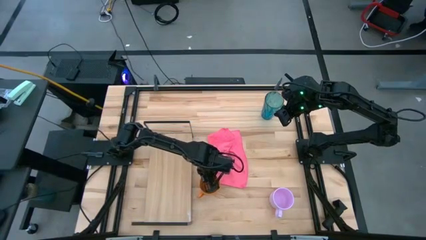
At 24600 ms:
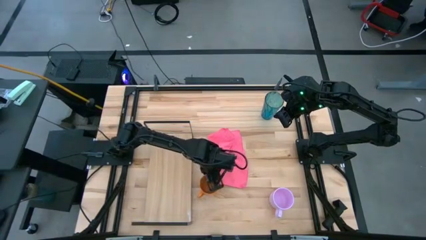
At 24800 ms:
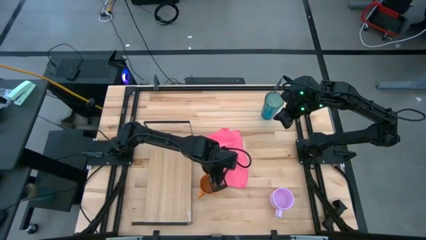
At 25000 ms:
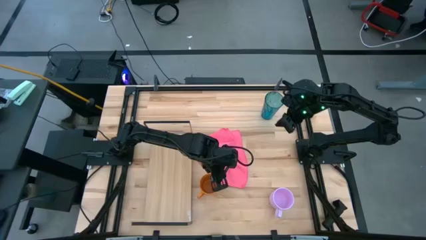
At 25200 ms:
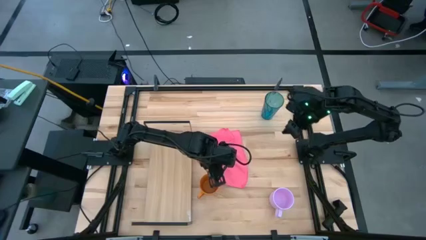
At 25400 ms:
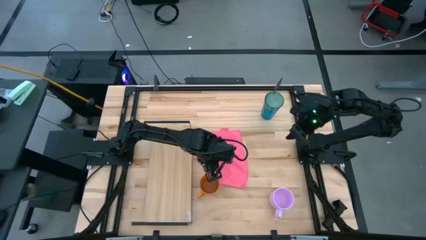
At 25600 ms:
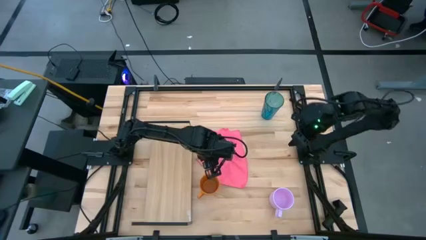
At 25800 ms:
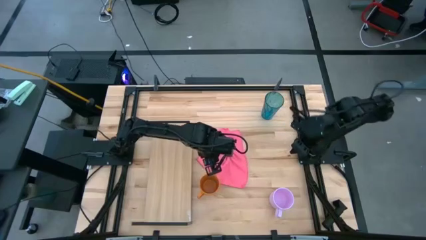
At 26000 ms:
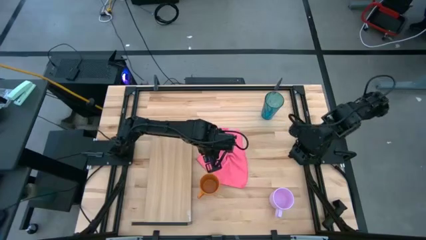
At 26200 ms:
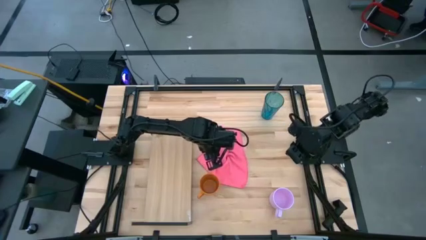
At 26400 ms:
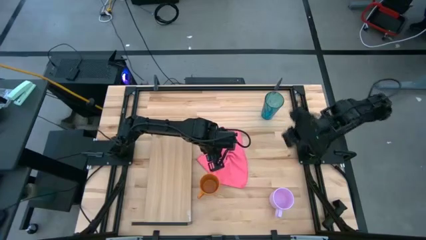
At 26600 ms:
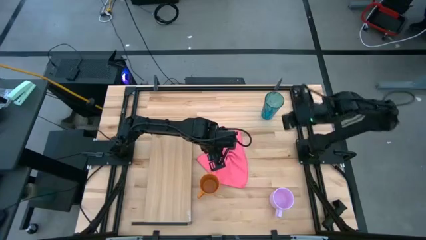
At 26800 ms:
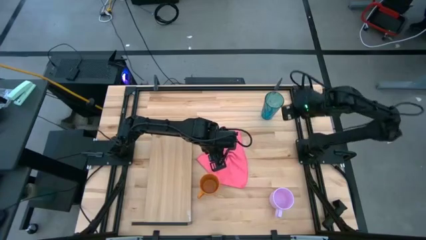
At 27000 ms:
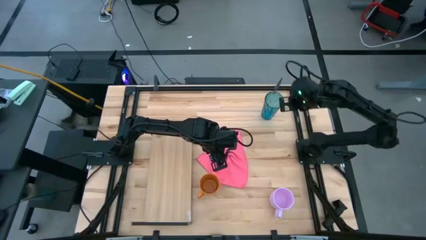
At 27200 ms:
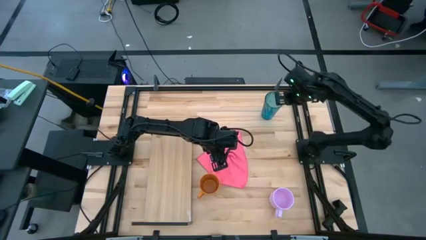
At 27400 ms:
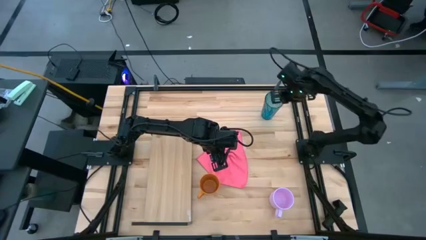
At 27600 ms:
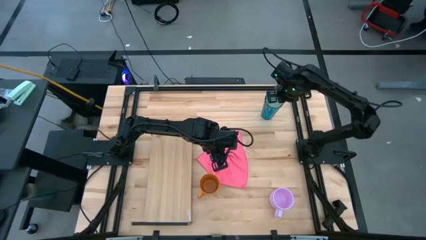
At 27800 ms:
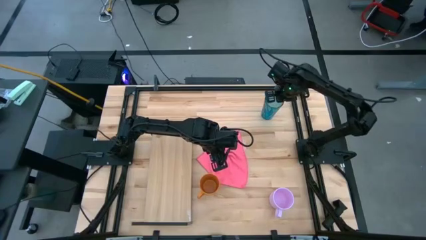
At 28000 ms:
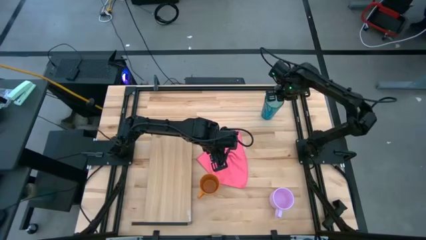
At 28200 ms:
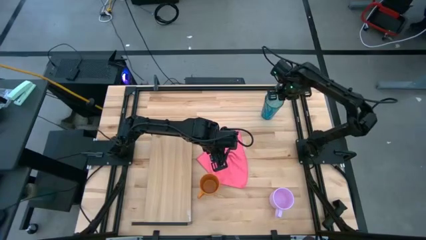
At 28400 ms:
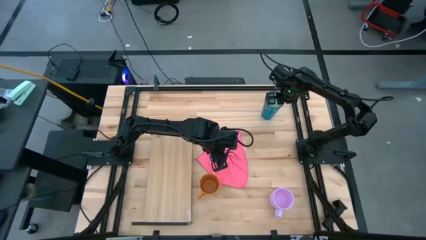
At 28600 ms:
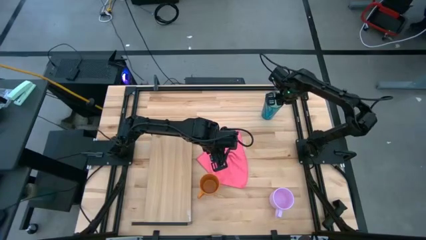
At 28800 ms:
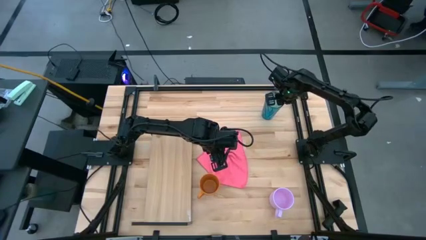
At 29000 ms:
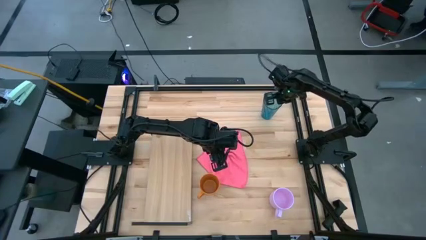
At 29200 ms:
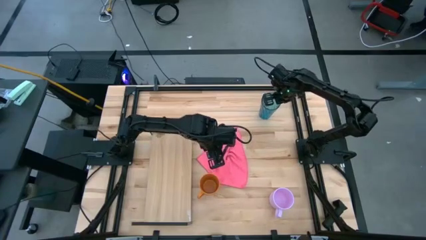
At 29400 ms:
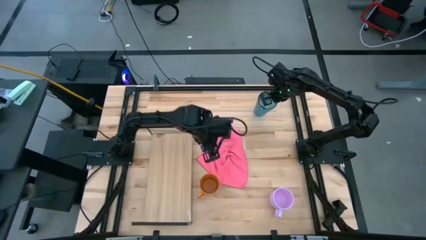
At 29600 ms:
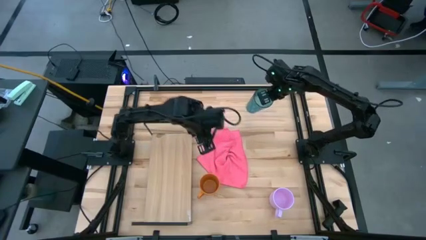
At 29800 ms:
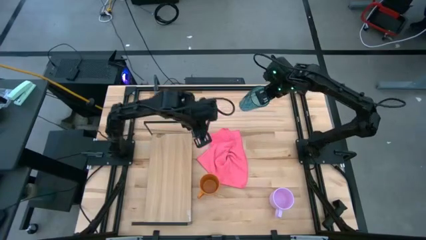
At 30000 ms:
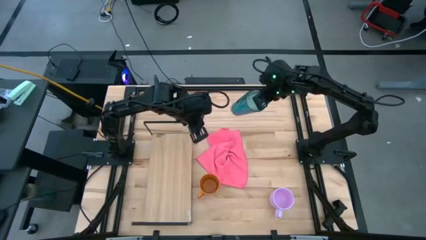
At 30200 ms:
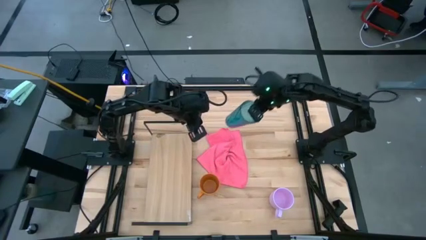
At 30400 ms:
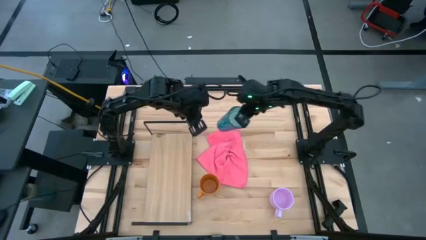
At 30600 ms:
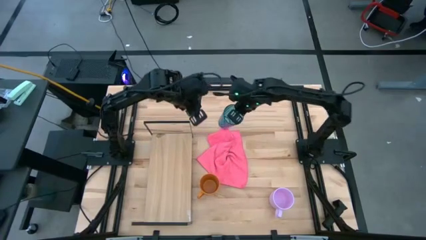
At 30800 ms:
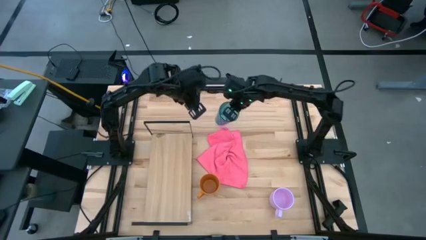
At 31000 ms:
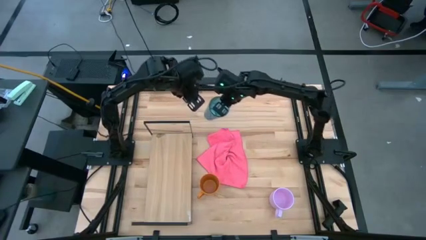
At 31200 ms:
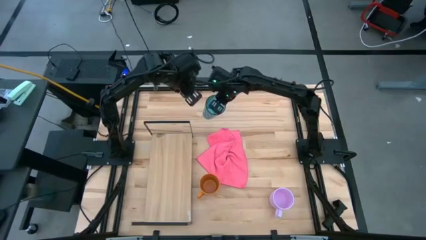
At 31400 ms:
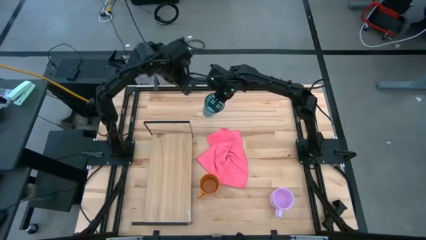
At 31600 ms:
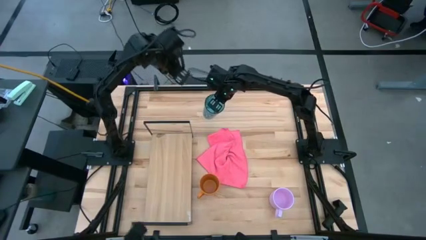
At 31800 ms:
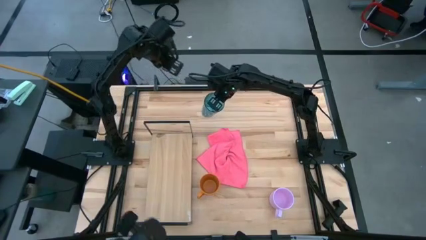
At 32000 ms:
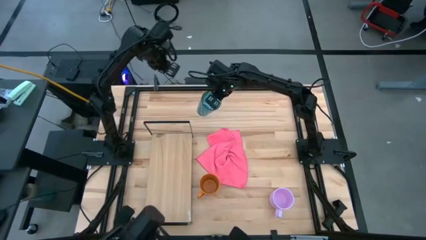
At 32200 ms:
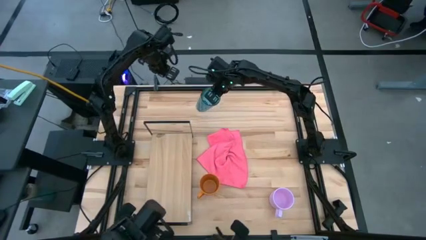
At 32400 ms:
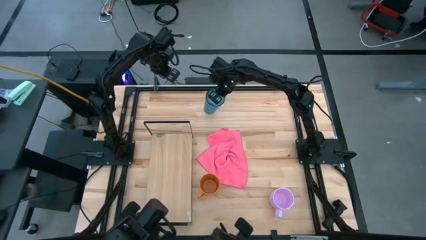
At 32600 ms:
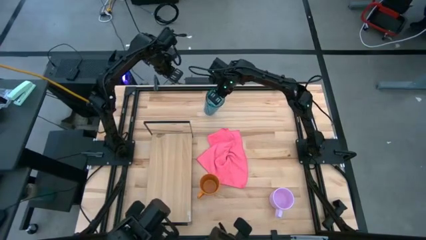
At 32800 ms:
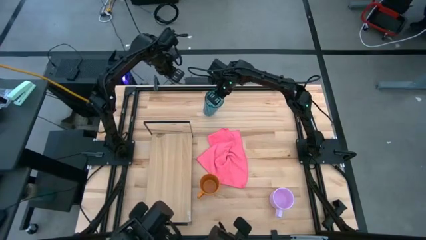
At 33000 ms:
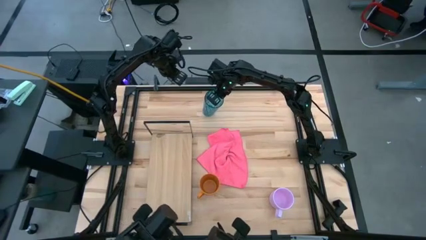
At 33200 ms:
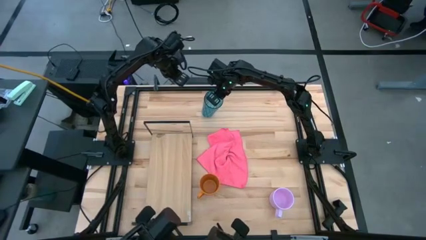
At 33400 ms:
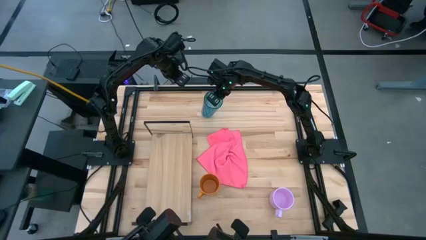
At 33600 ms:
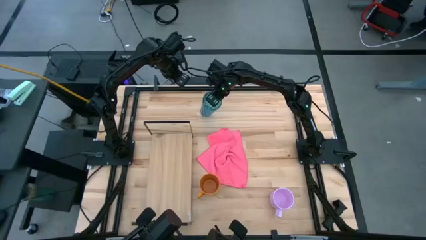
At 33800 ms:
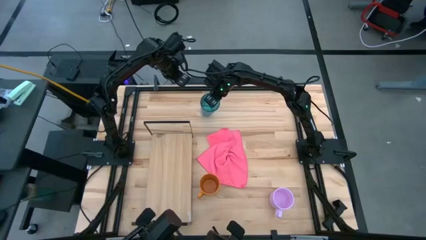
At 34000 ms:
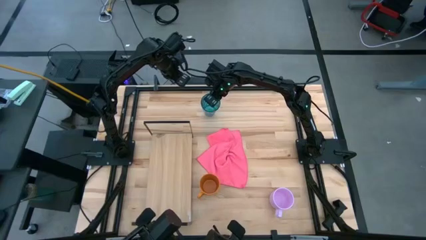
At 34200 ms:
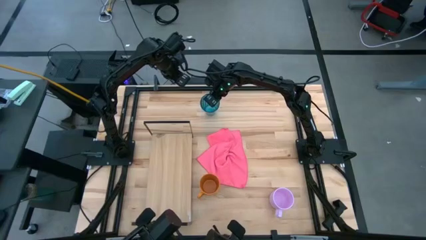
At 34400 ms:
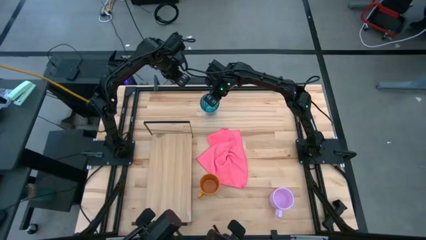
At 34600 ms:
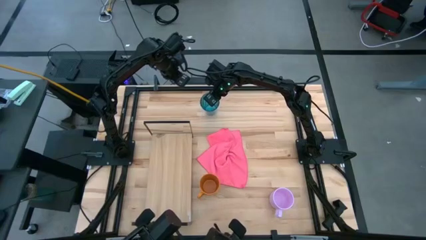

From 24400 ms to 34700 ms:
Task: Stack small to large cups/mugs on shelf
Put the blue glass on the shelf

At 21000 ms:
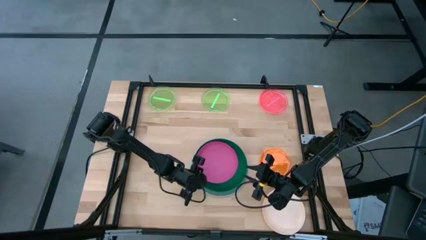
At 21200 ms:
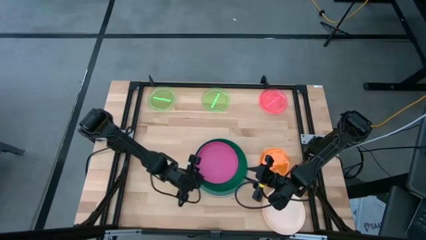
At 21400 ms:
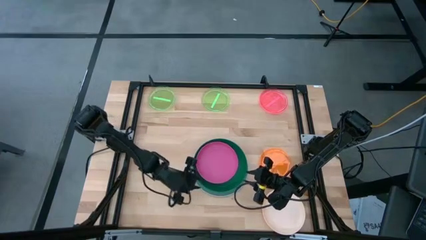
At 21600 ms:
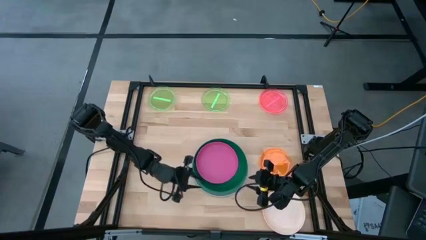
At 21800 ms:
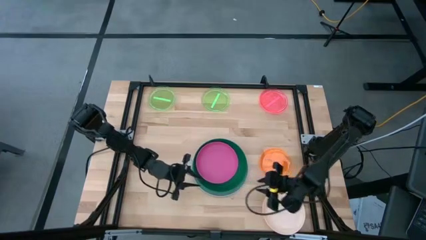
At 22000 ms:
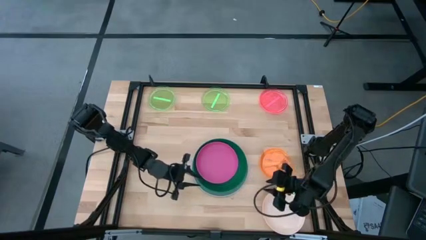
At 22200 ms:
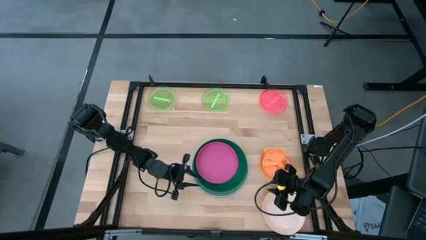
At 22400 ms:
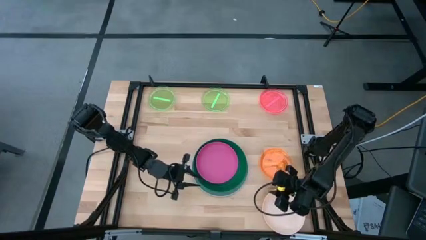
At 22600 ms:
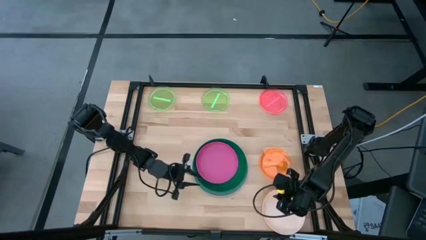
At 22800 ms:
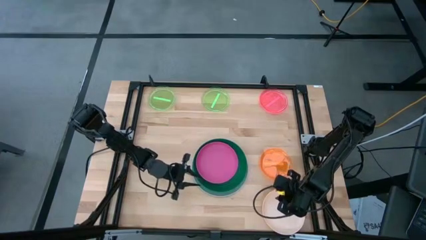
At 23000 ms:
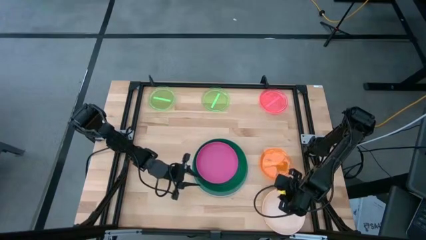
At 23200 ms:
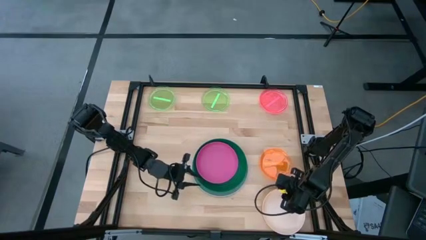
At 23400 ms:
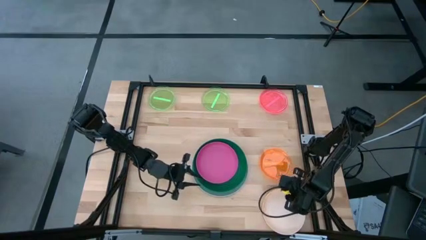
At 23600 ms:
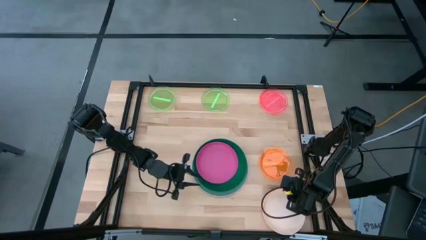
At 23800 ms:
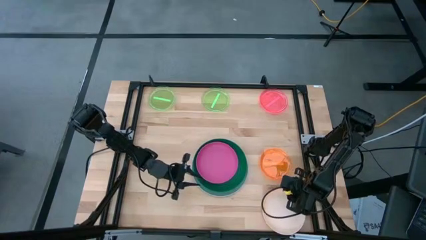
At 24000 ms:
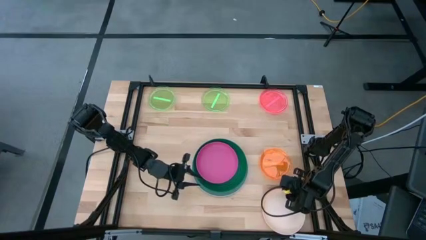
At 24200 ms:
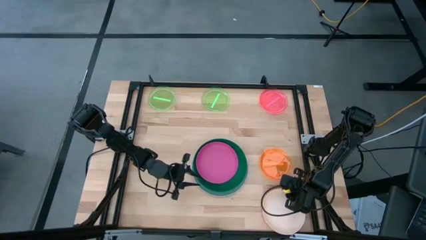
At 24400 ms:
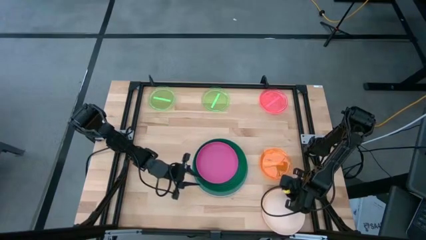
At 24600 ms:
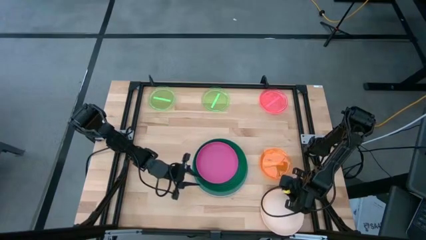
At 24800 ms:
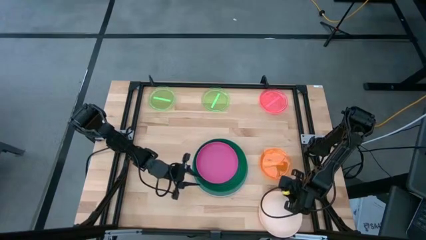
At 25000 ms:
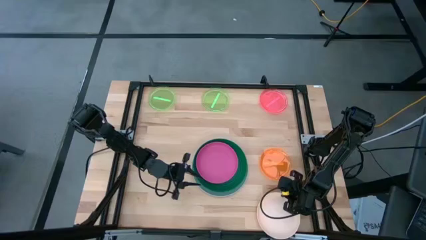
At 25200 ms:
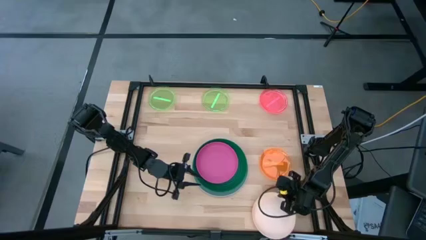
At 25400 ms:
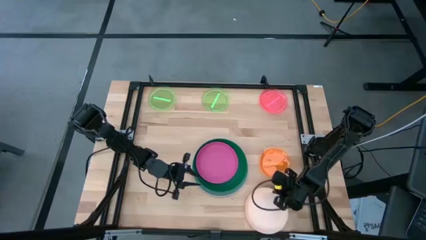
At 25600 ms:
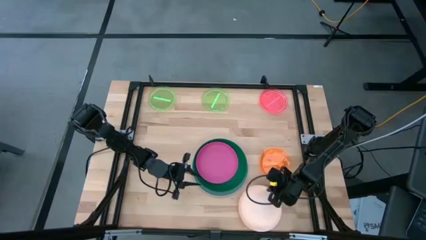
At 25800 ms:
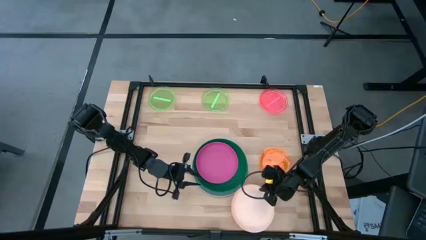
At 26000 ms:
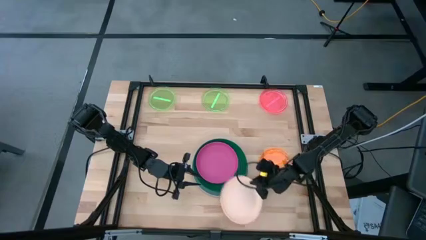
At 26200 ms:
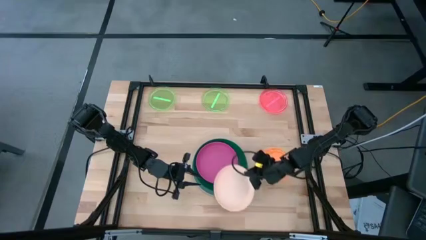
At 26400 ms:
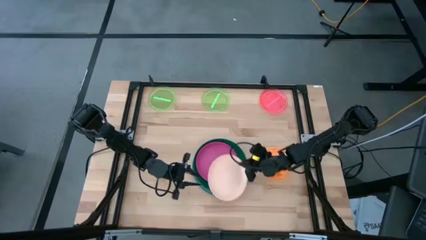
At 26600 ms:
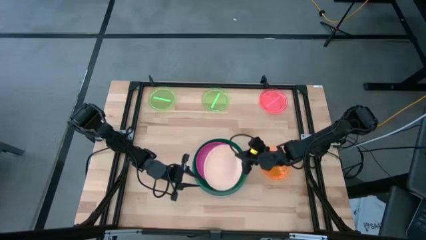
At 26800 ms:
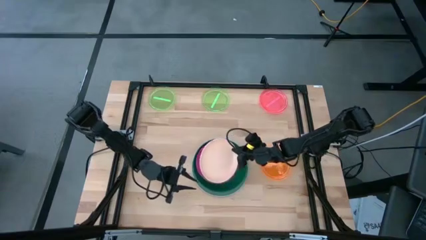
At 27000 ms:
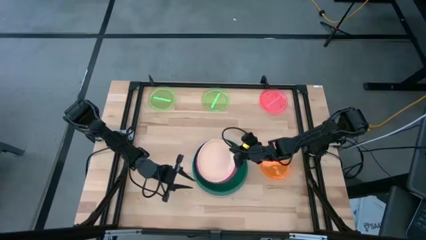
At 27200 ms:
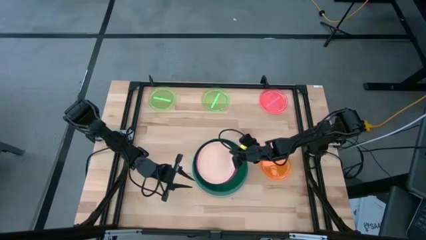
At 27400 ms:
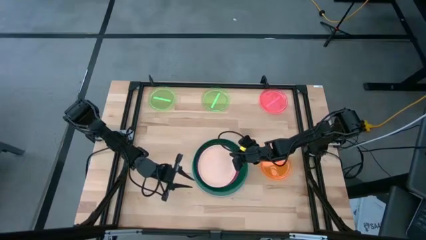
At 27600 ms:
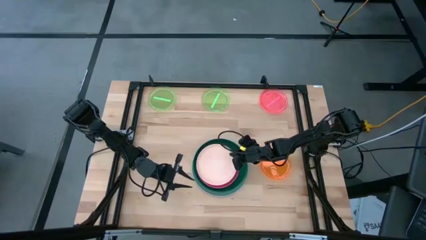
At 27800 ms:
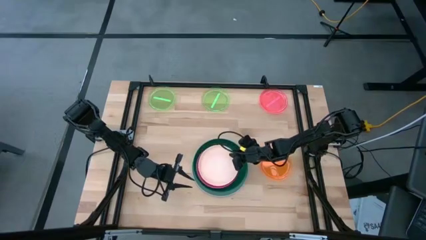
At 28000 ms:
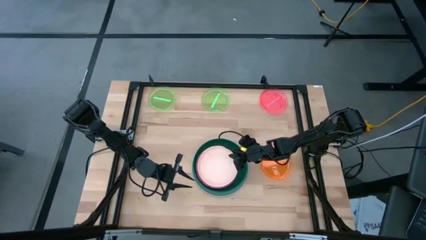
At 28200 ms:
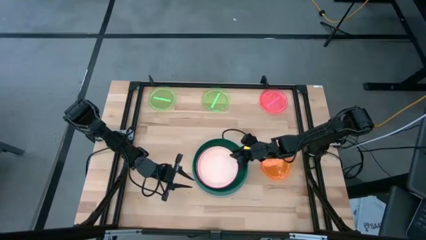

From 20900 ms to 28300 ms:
Task: Stack plastic plates
Stack the light brown plate on top of the pink plate
